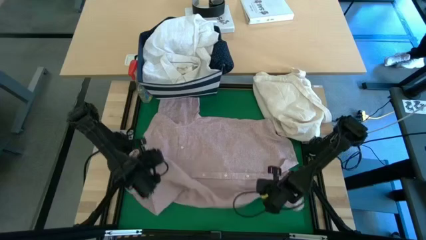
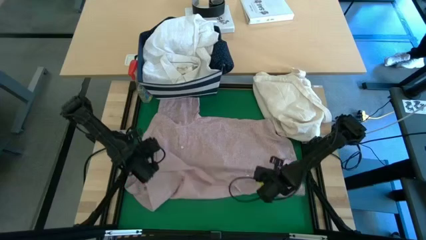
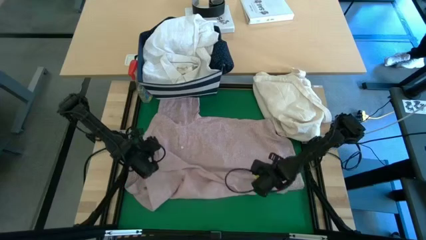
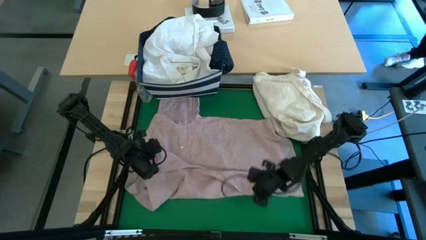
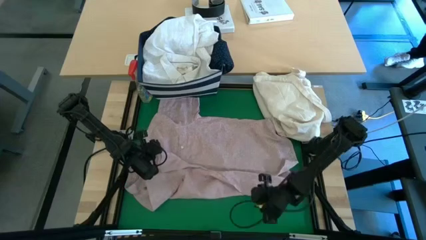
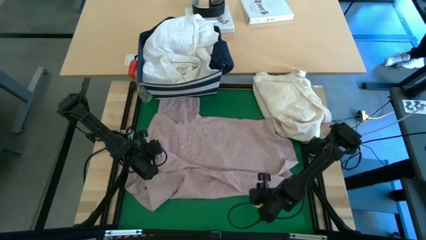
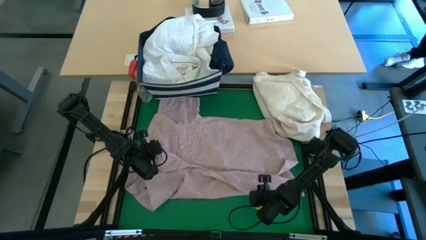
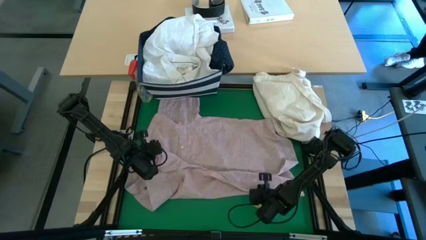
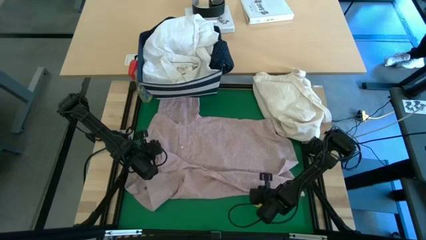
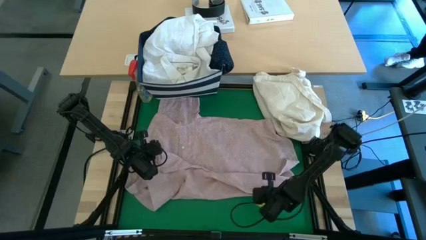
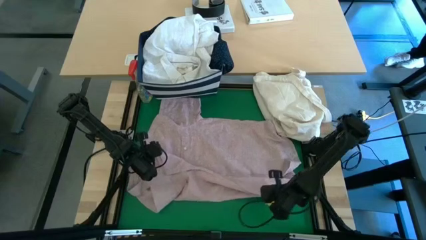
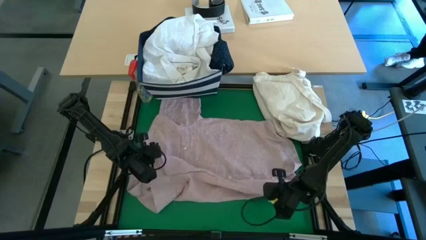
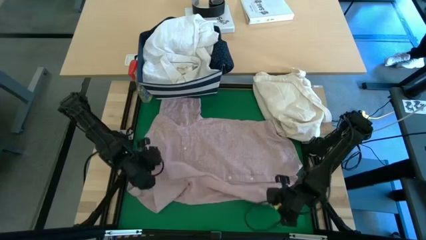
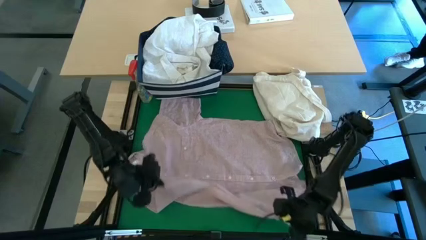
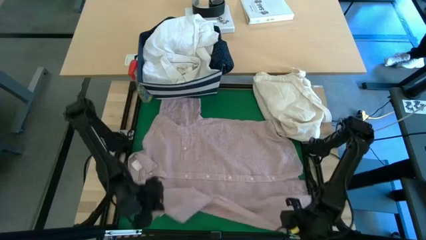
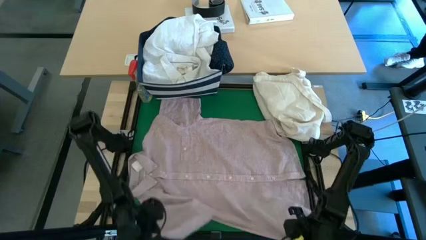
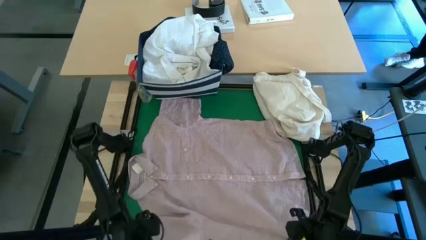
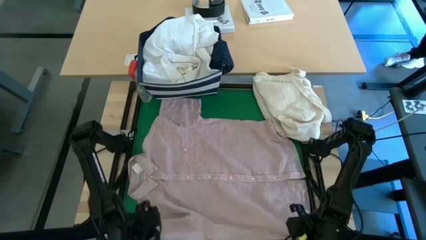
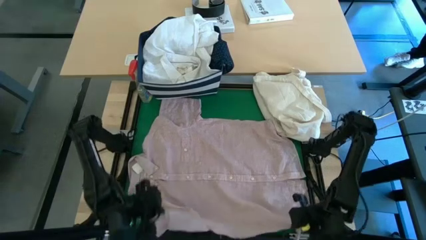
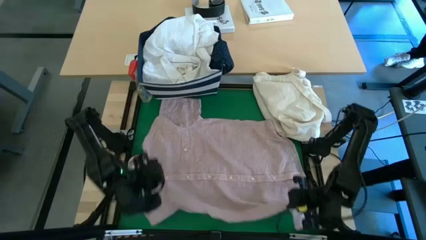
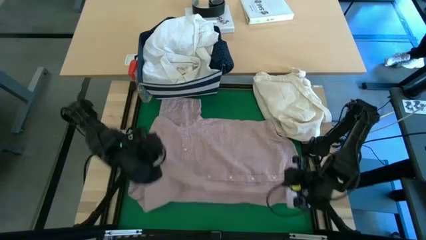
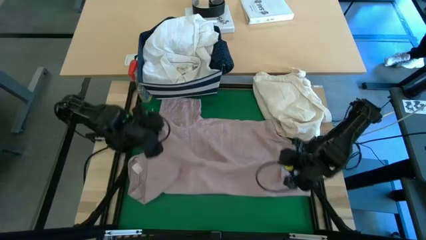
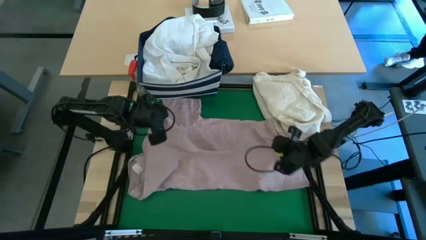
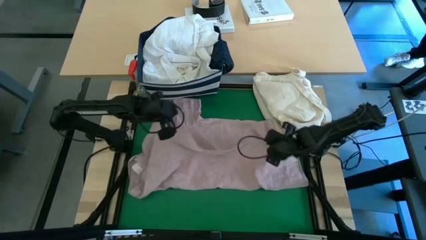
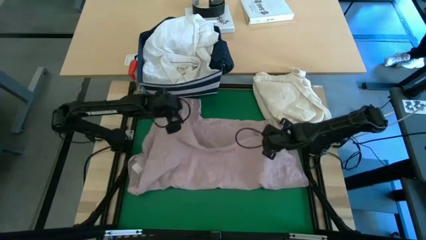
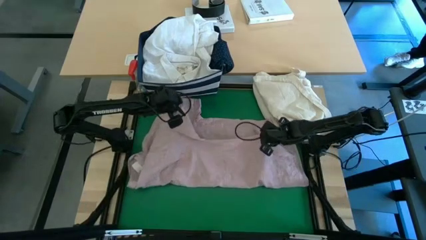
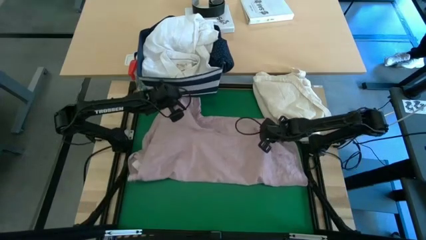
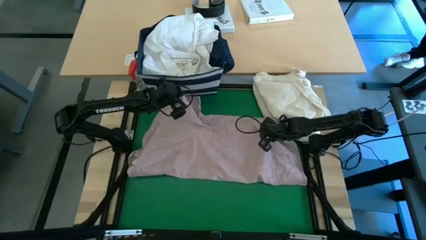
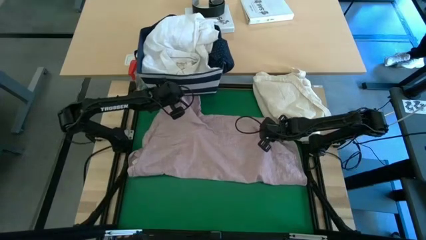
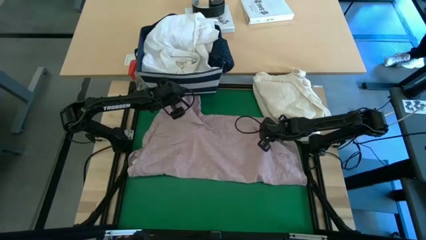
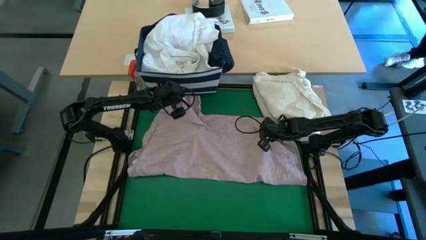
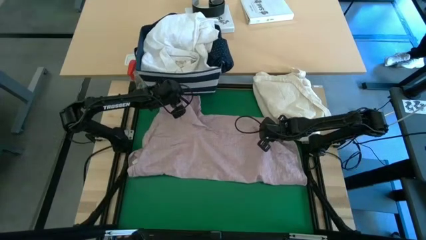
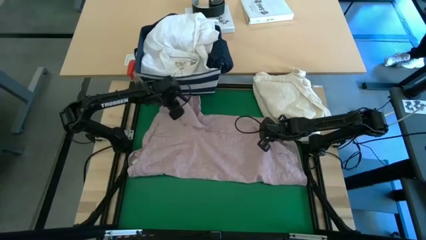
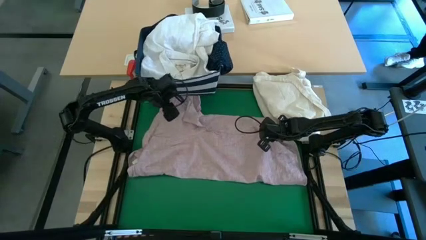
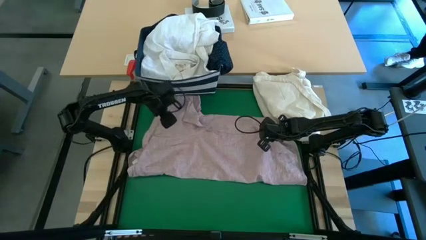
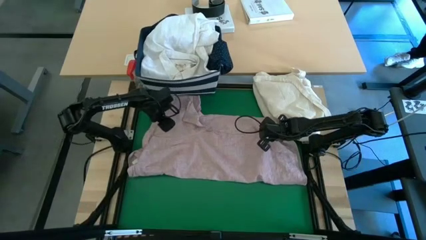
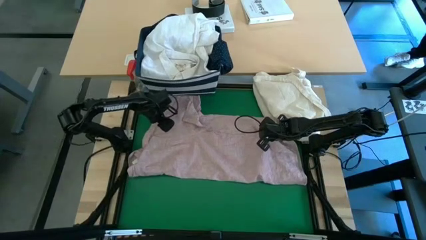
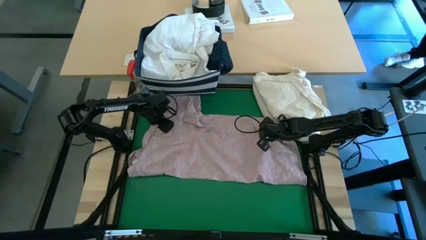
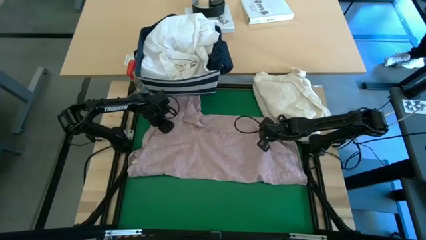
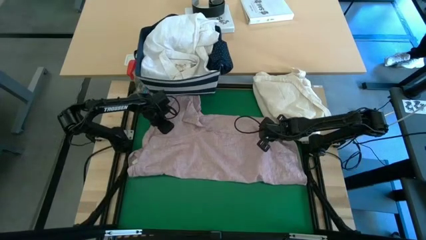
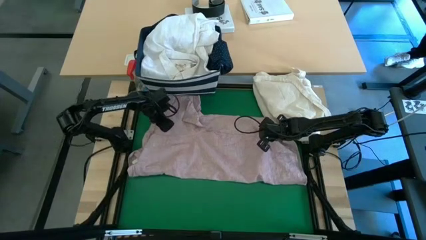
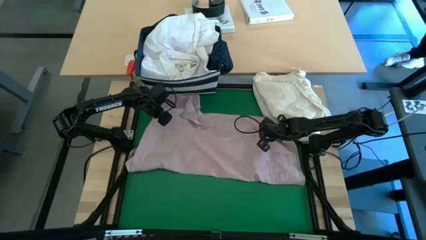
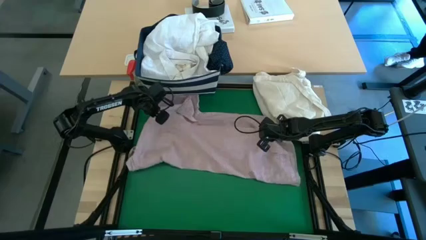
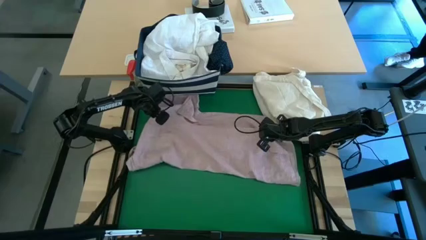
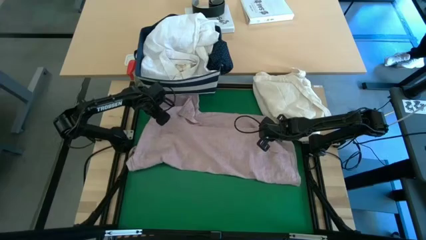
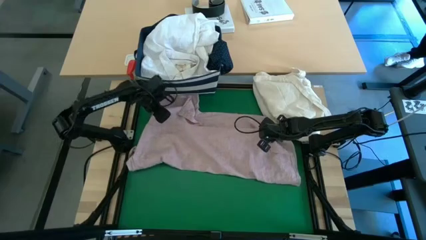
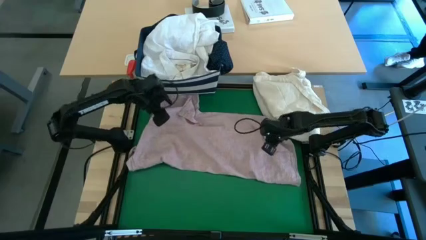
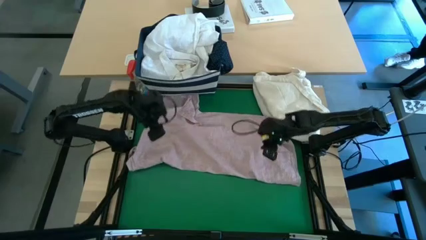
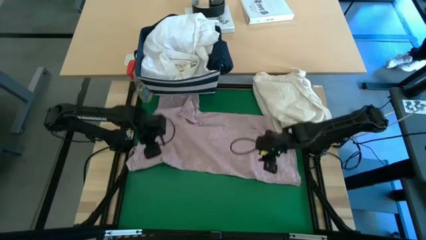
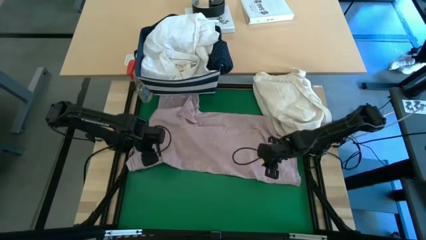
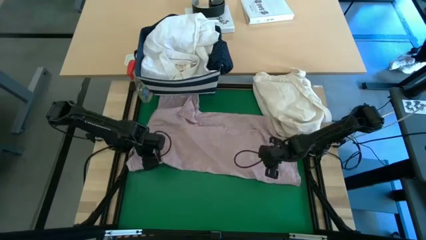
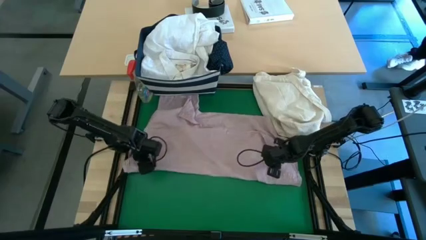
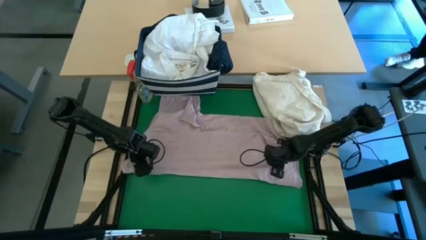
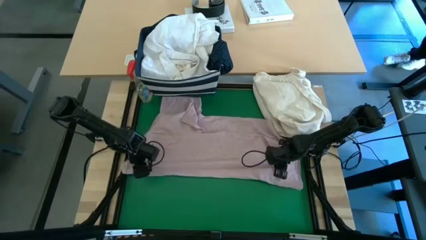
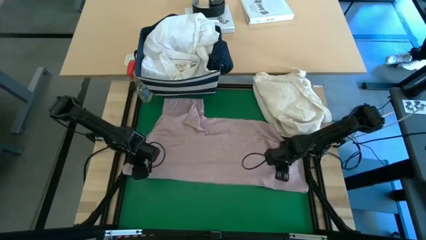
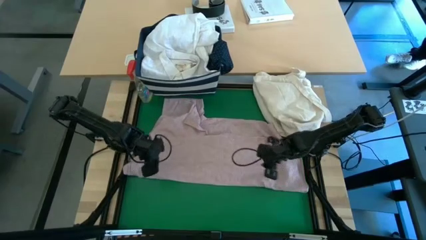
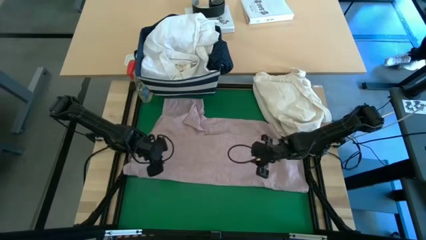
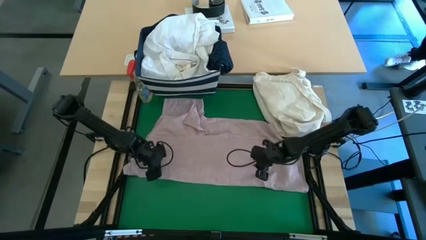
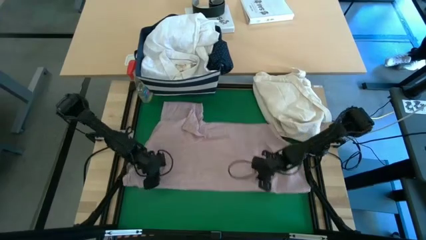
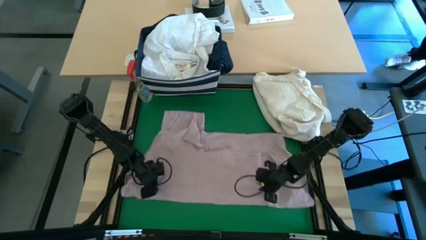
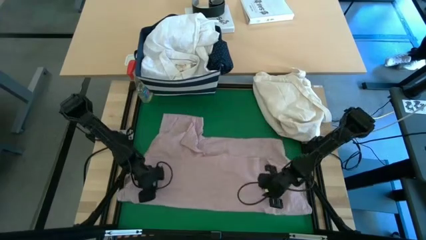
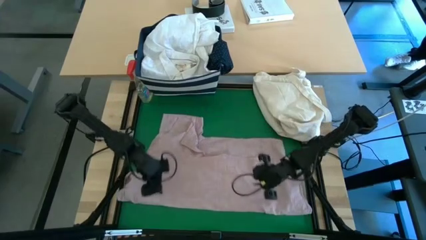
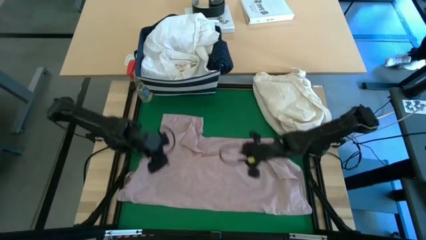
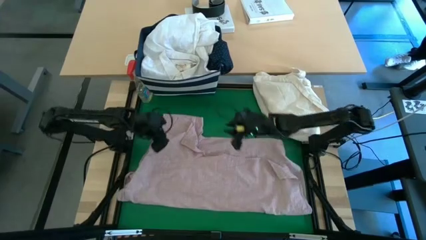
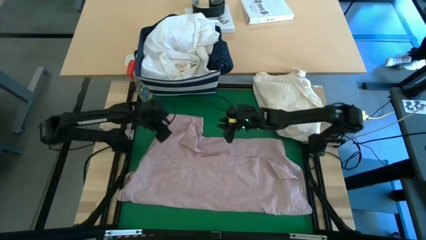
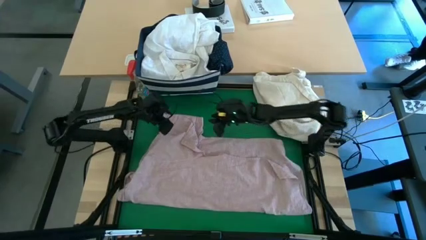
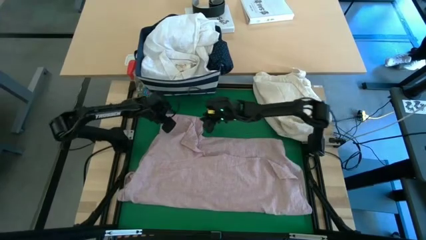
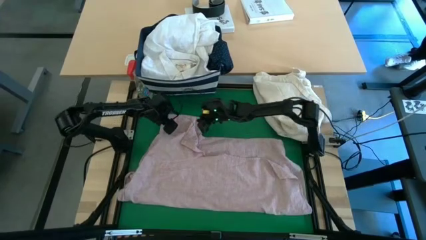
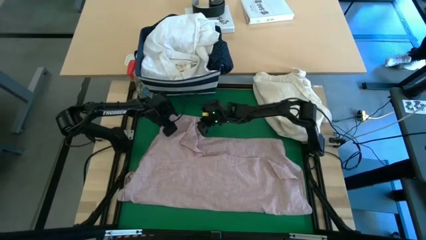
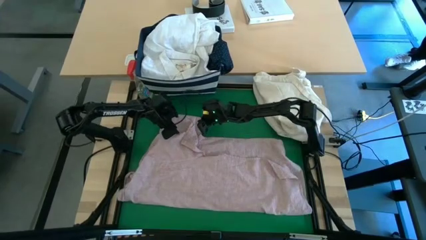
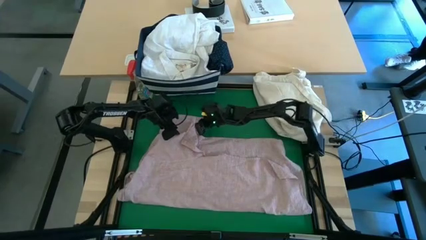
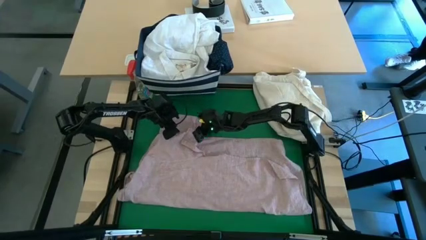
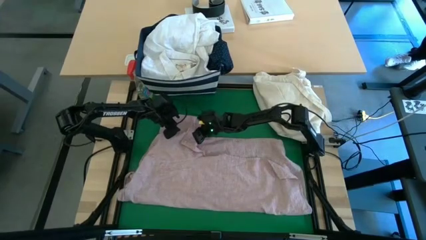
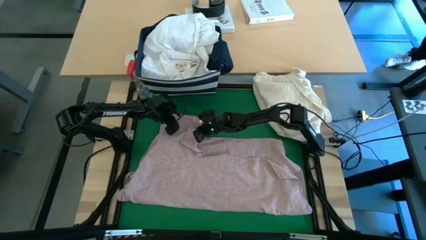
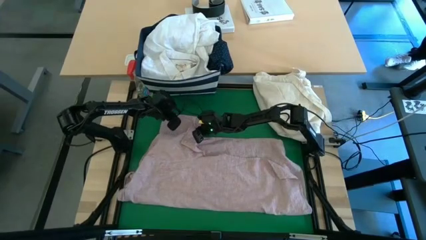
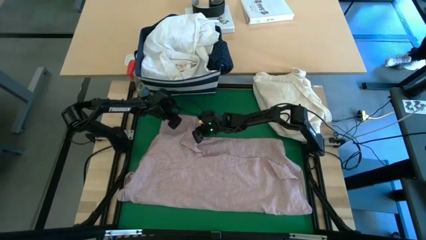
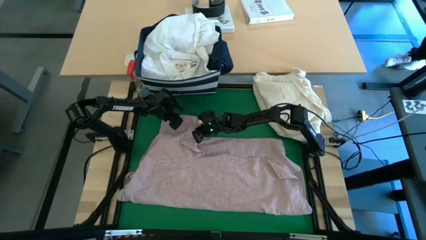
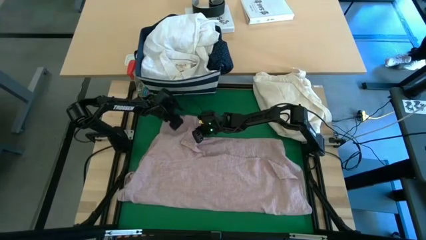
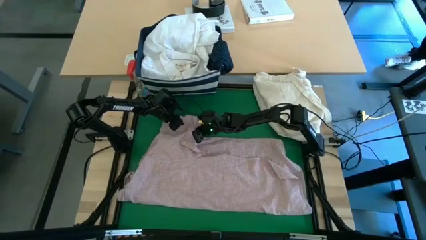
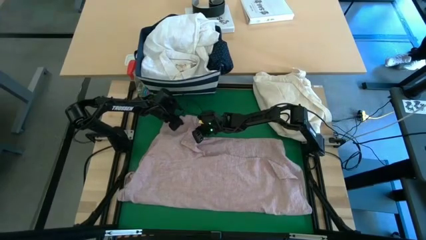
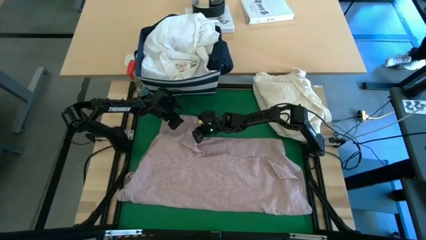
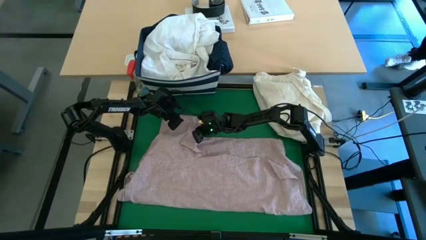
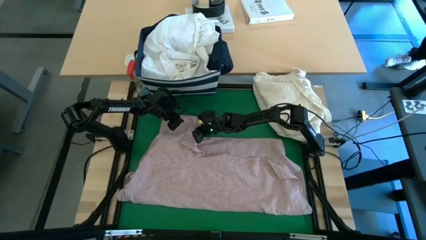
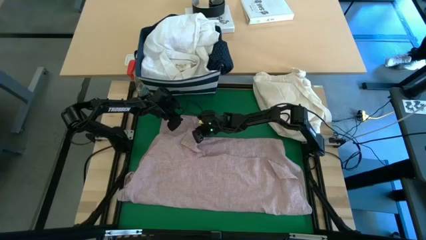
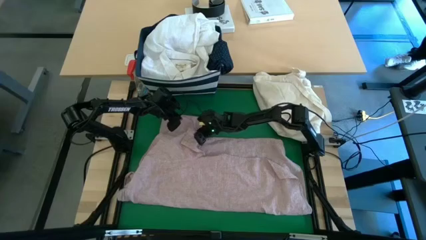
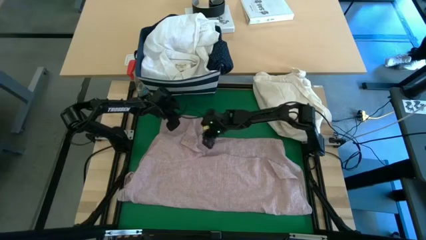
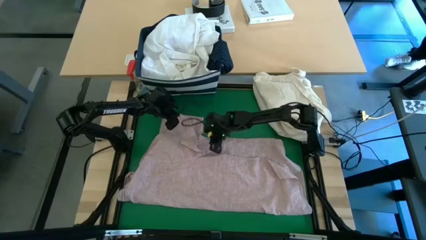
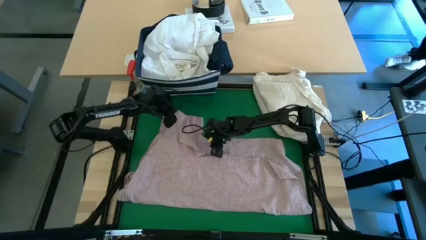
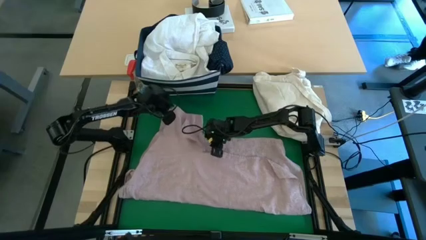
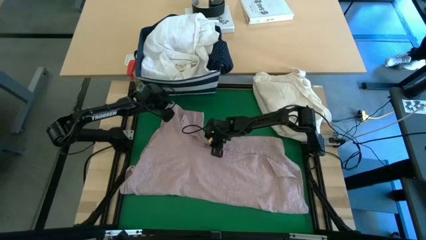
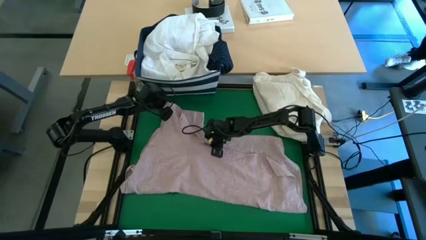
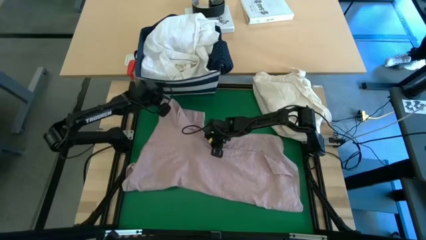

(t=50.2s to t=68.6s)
Task: Fold laundry
Fold the red polo
